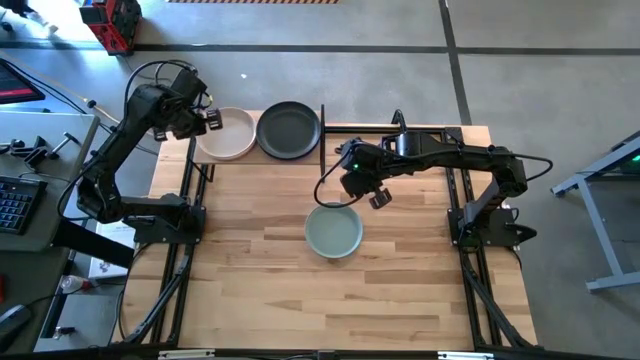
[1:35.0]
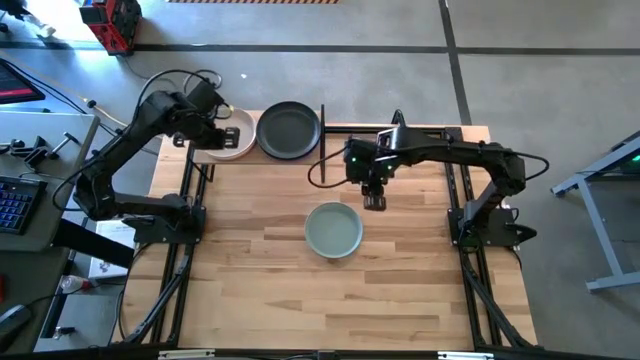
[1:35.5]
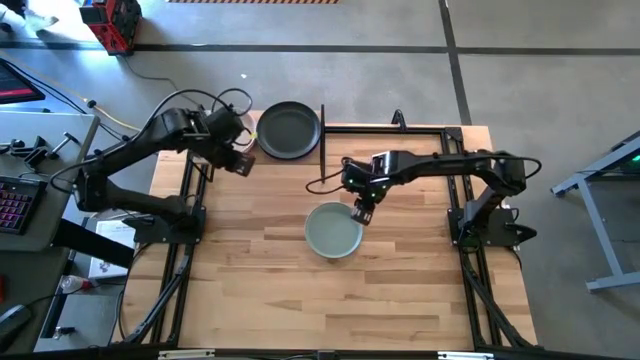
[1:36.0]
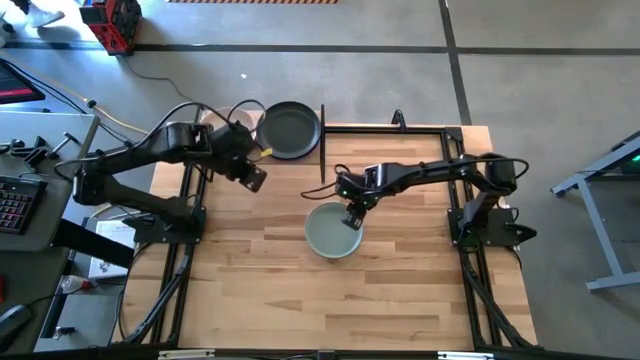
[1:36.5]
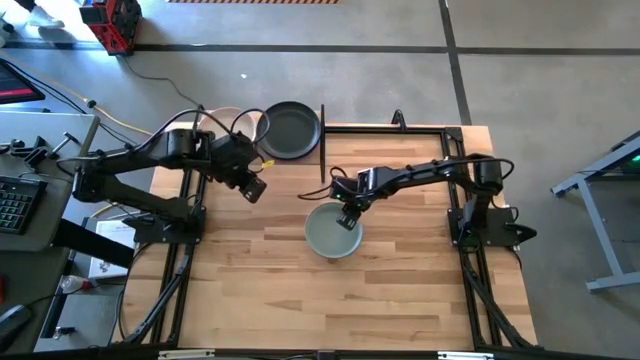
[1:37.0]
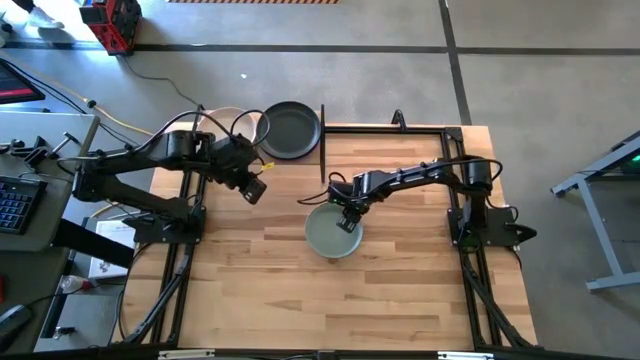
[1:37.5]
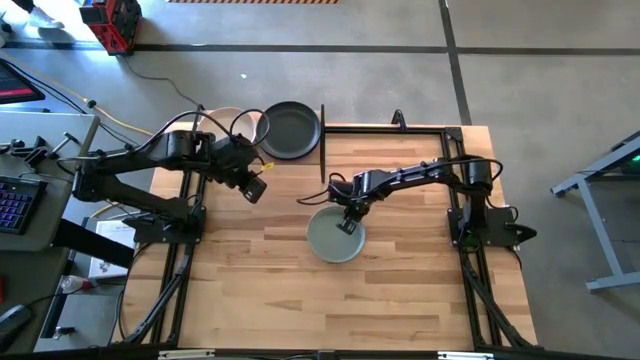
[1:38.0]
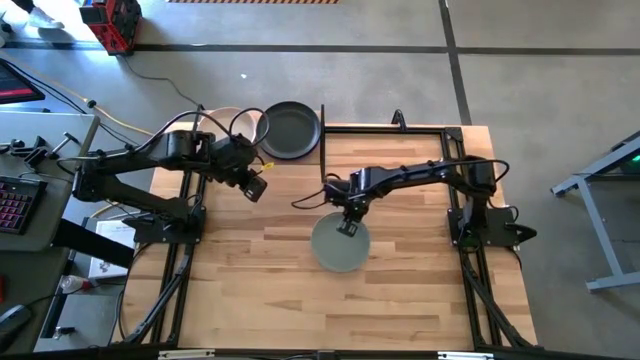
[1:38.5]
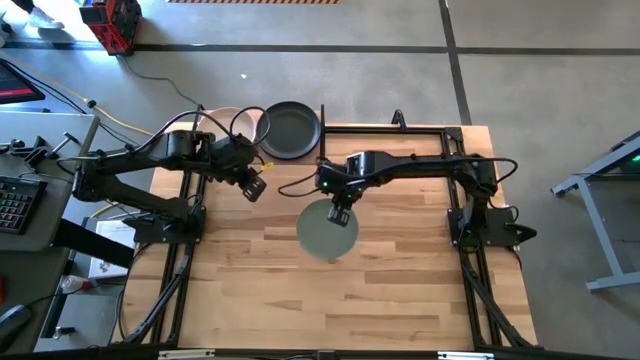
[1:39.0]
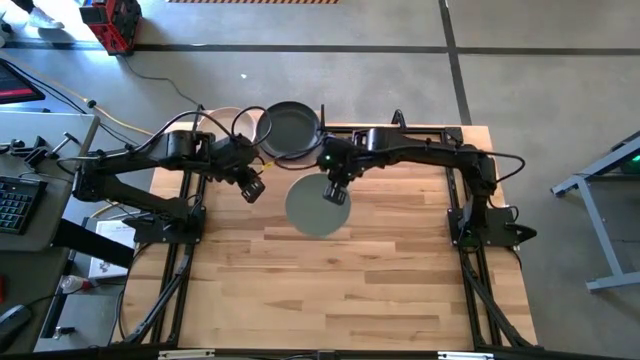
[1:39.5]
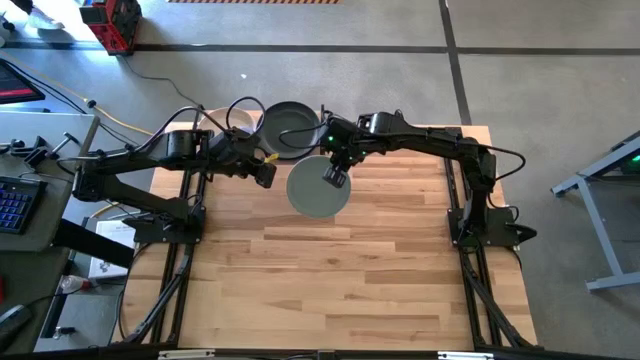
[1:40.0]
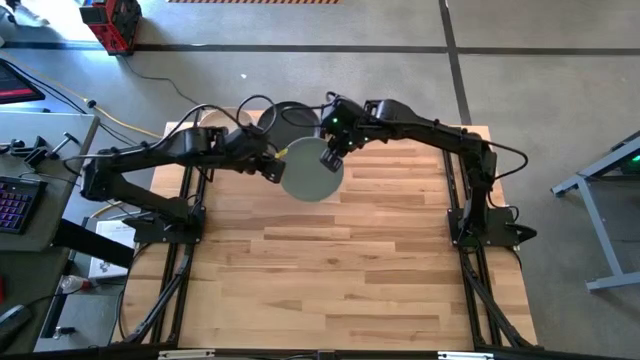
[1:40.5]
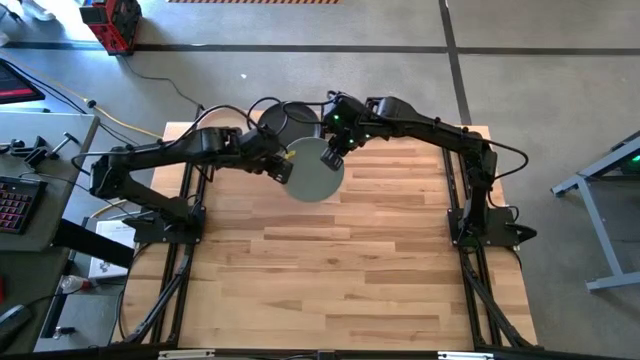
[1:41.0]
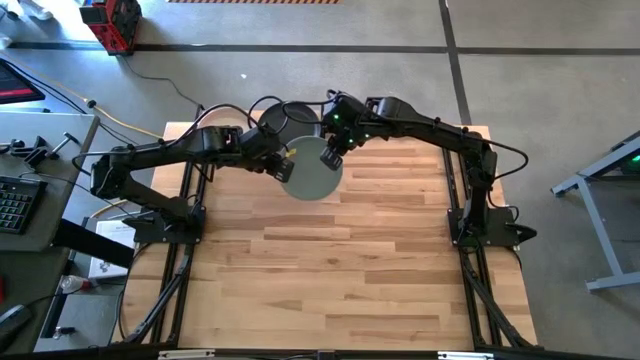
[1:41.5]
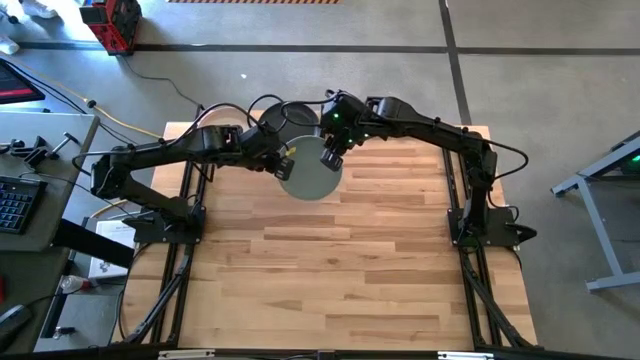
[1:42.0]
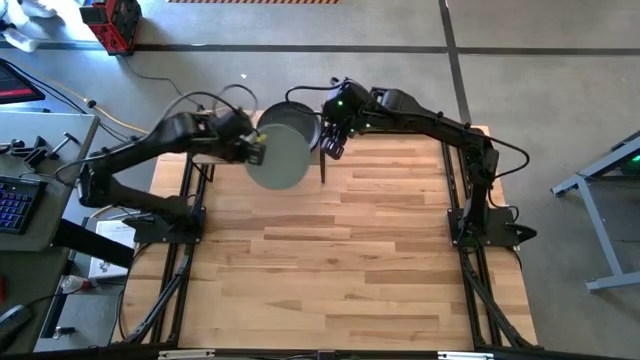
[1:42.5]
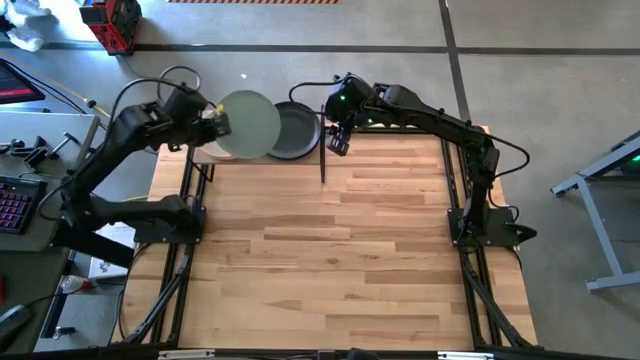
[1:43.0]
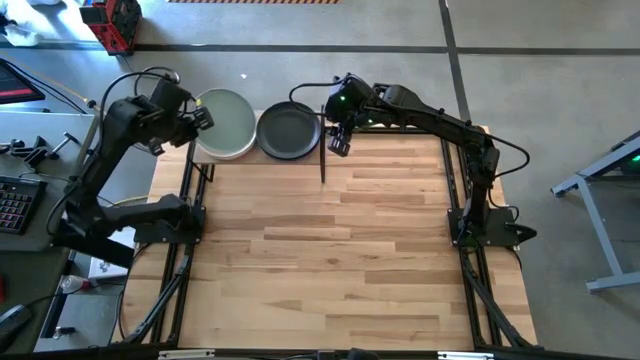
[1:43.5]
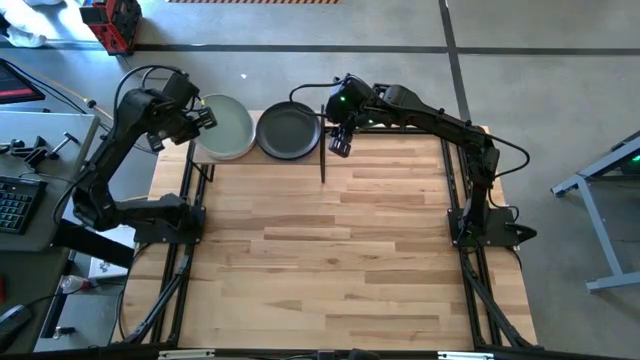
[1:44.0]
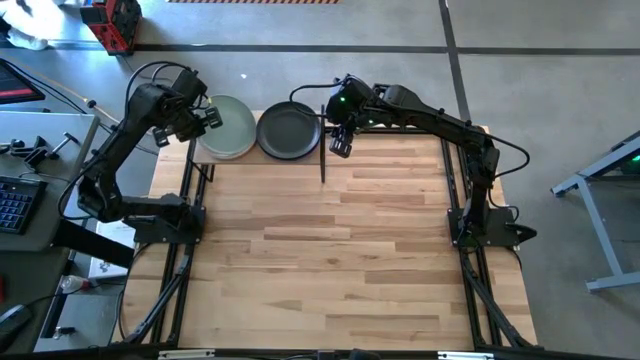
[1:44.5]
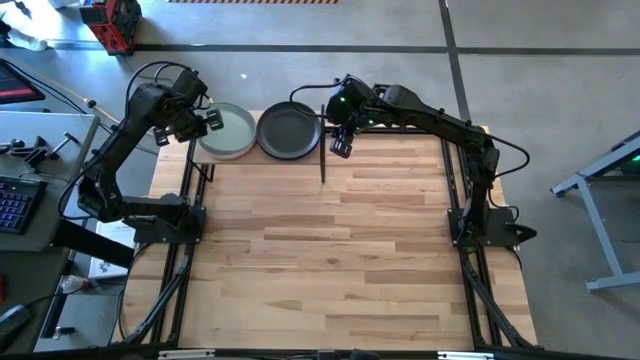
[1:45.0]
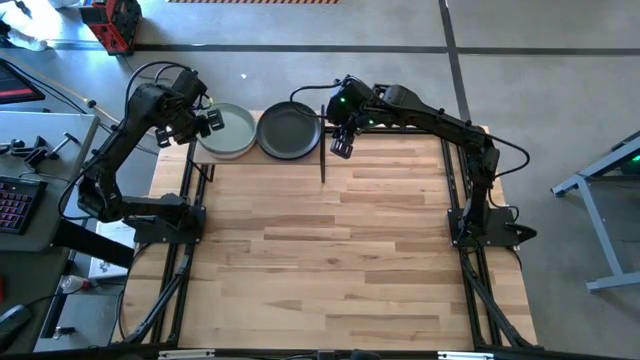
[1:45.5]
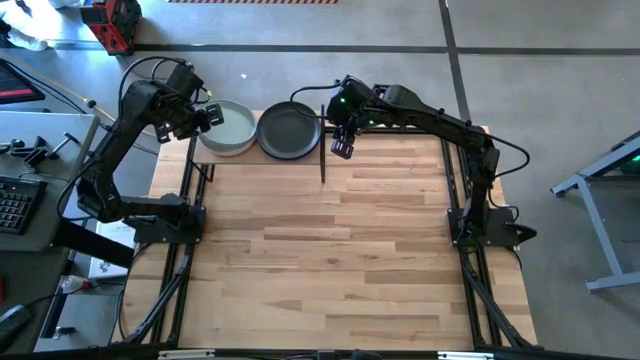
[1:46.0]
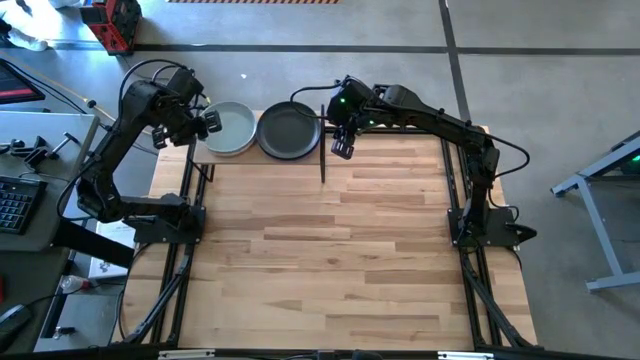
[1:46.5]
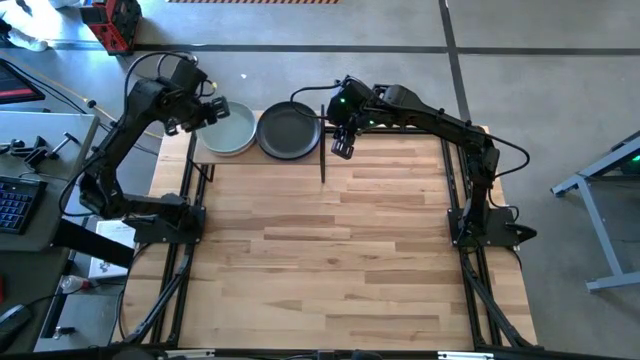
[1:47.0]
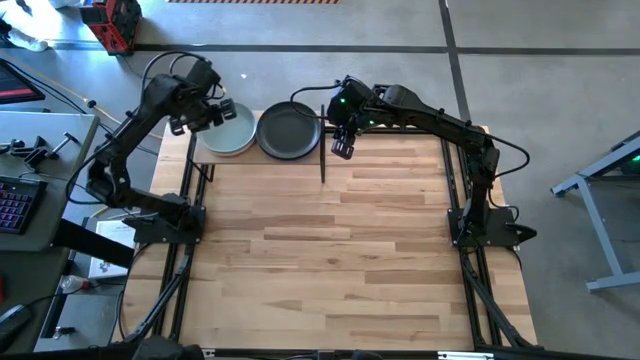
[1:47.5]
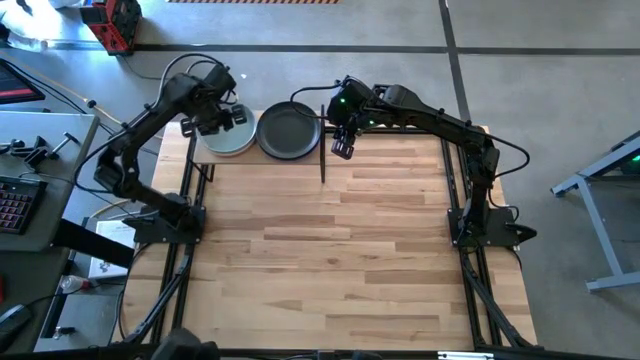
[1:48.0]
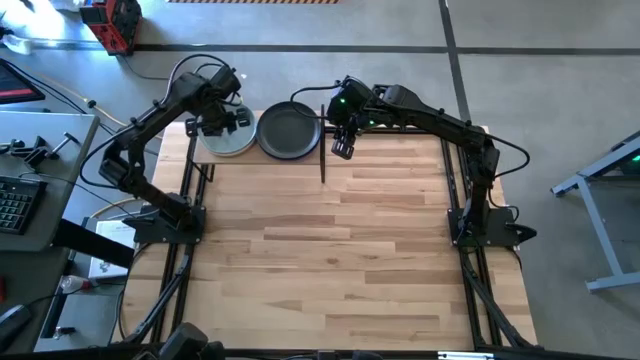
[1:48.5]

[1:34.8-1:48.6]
Task: Place and stack plates onto a shelf
Stack the light blue plate on top of the gray plate on the shelf

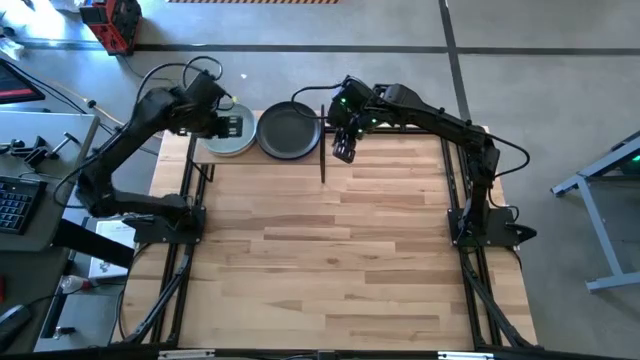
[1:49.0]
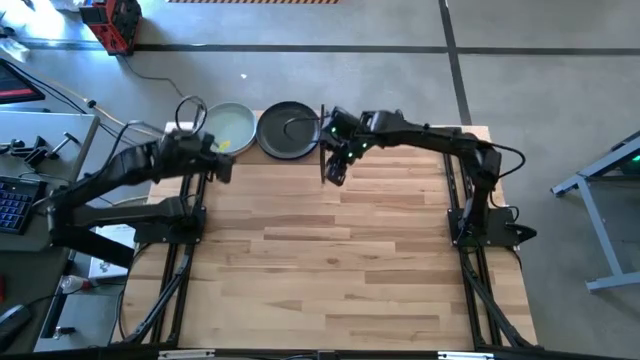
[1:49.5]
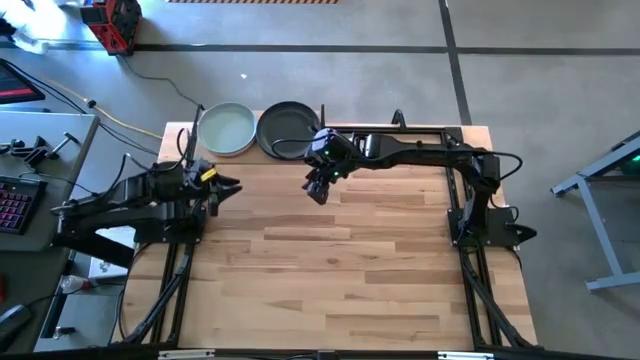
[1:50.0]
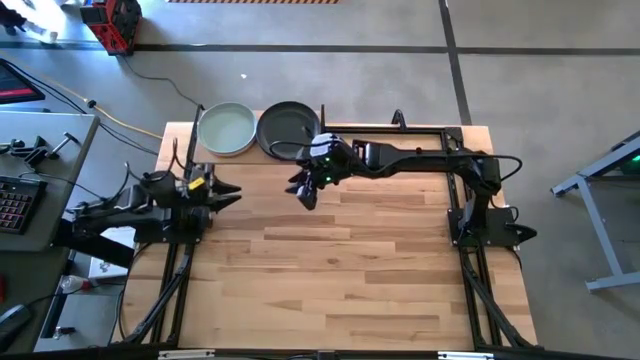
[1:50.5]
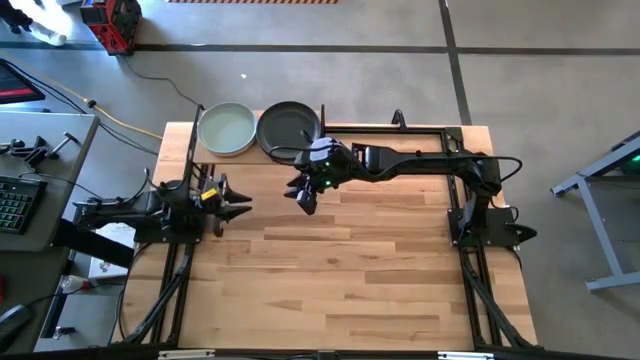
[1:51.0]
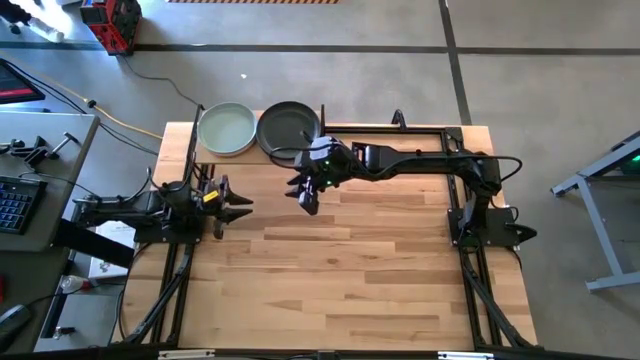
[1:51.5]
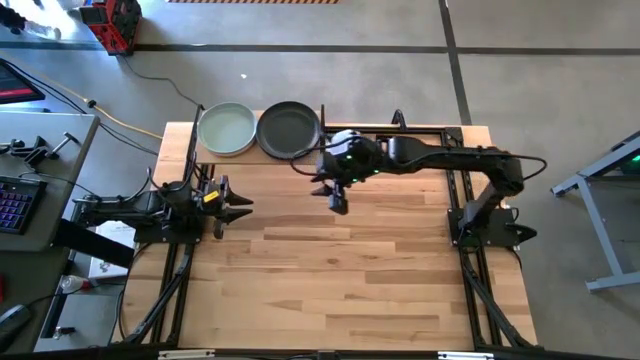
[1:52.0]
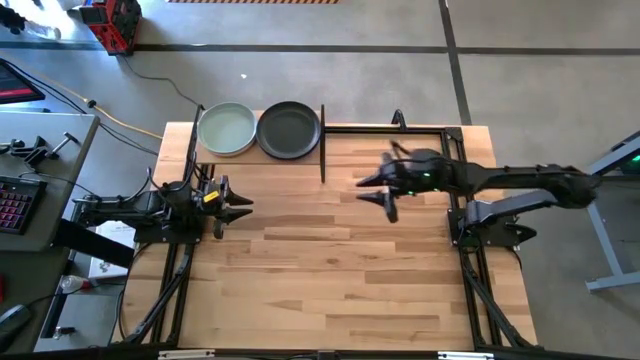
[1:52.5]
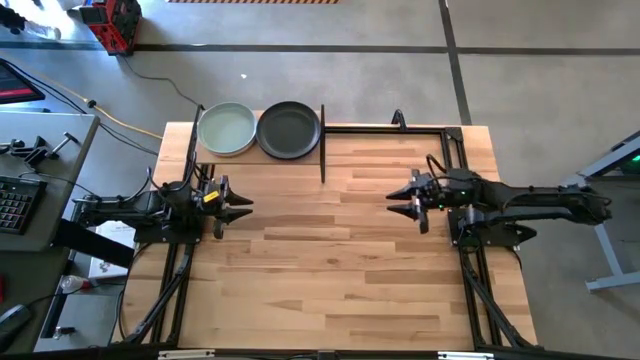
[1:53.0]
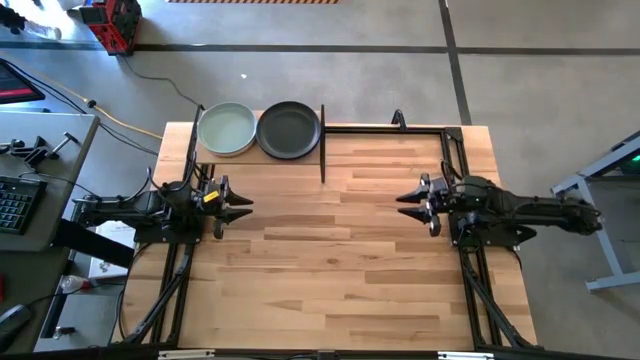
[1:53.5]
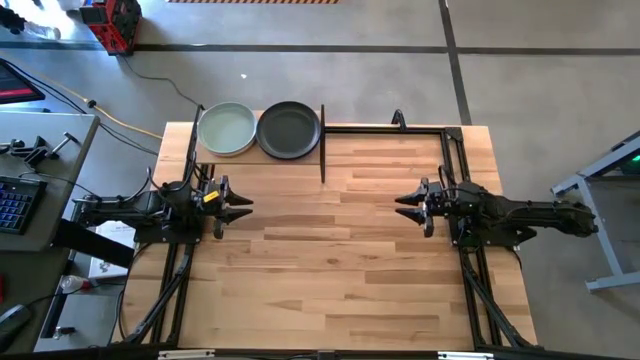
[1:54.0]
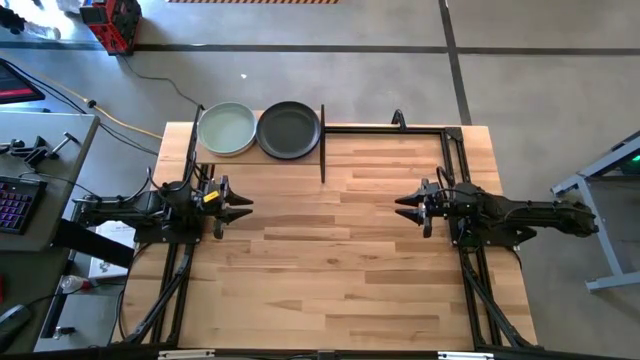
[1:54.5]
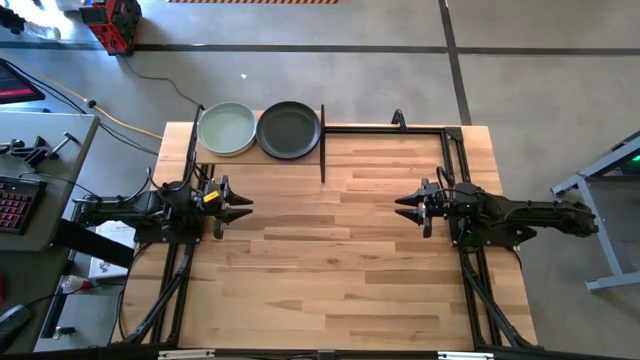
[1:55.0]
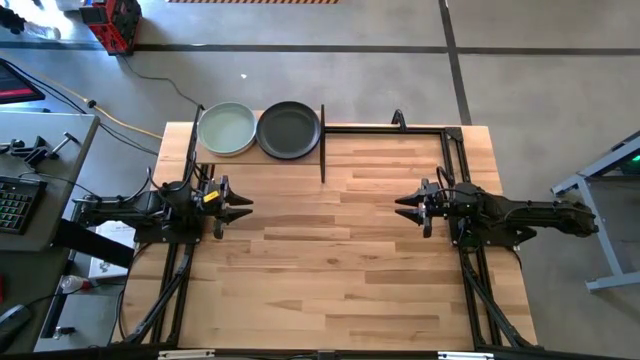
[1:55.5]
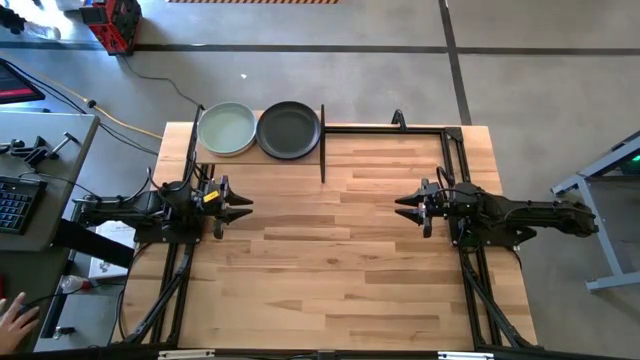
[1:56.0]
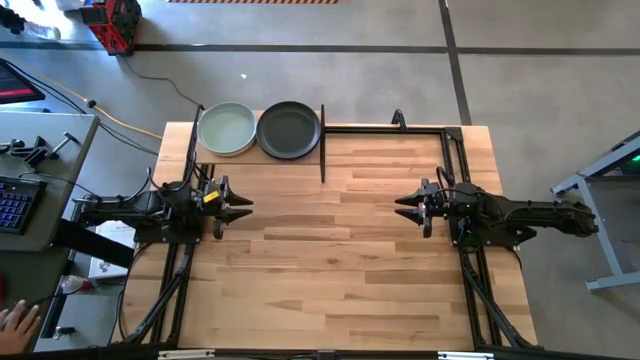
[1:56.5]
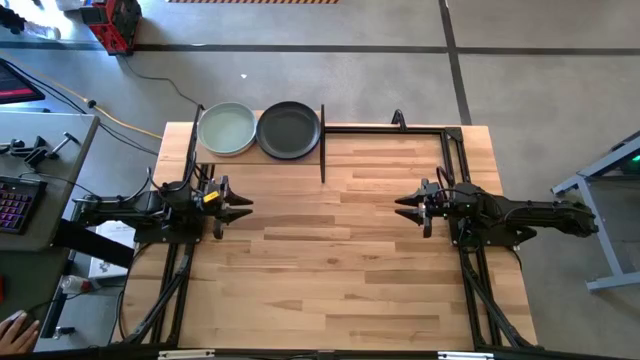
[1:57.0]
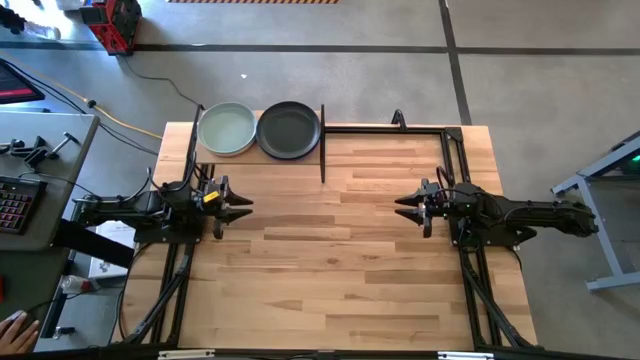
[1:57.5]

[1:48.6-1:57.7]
Return to Home Position
